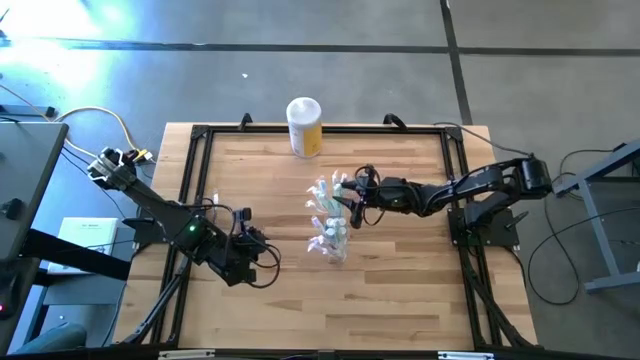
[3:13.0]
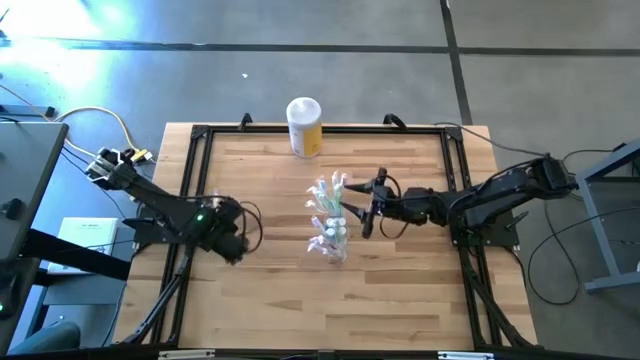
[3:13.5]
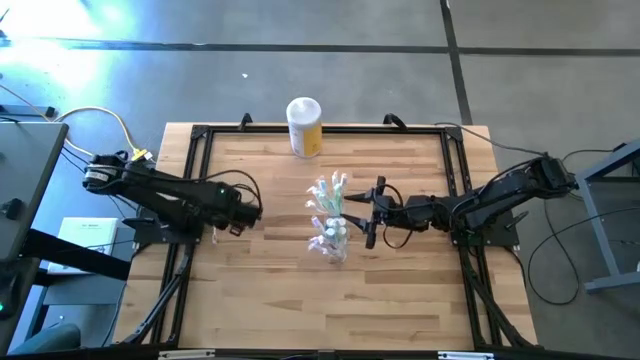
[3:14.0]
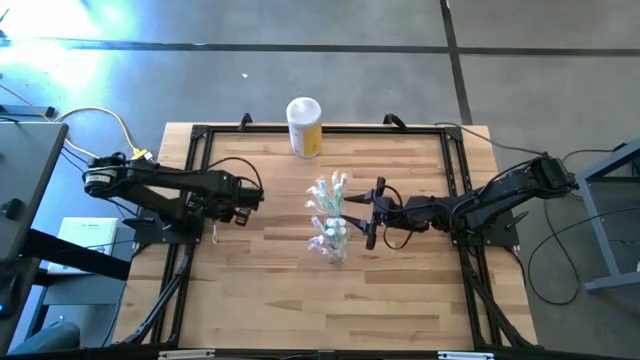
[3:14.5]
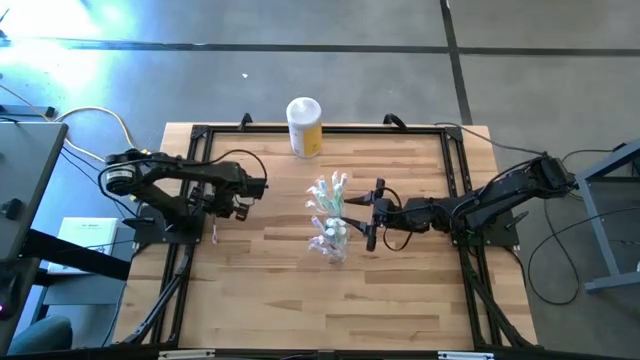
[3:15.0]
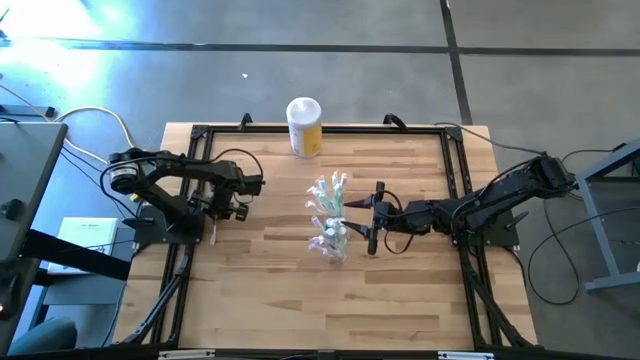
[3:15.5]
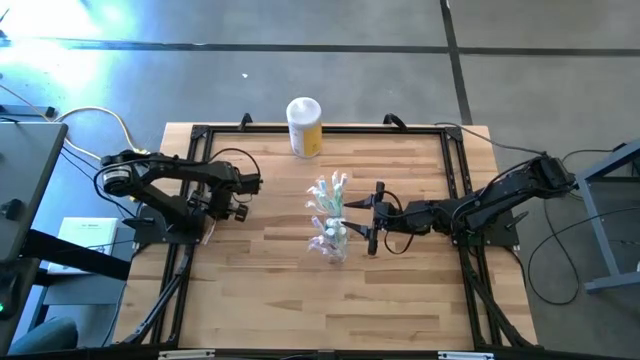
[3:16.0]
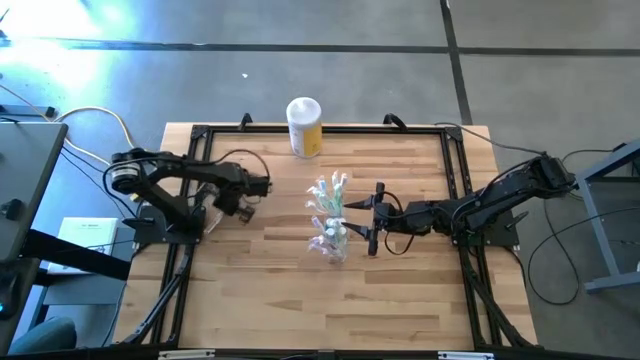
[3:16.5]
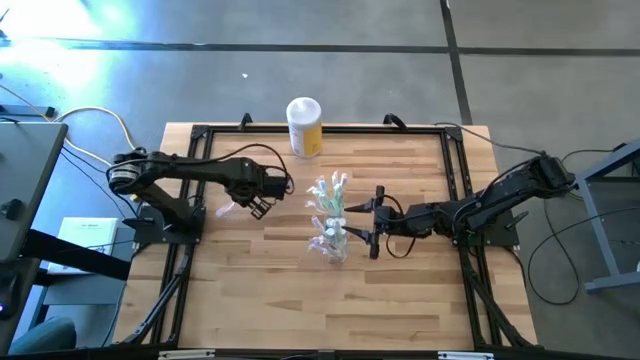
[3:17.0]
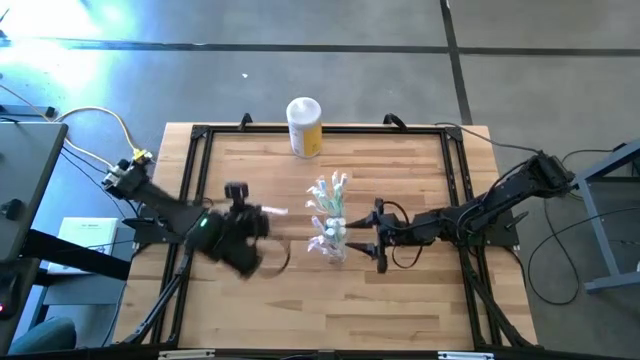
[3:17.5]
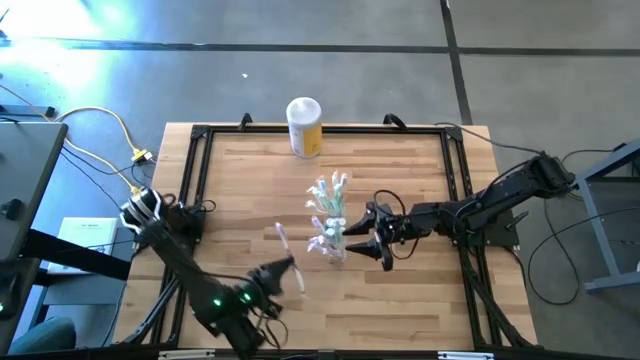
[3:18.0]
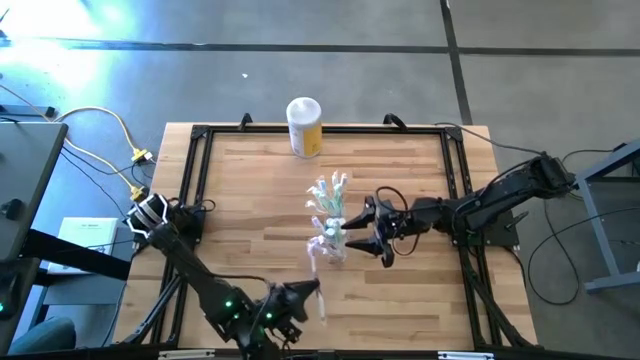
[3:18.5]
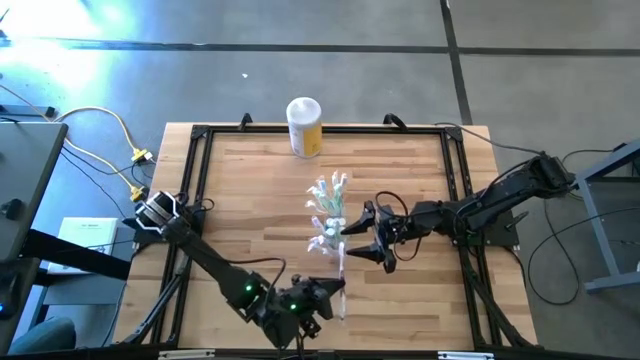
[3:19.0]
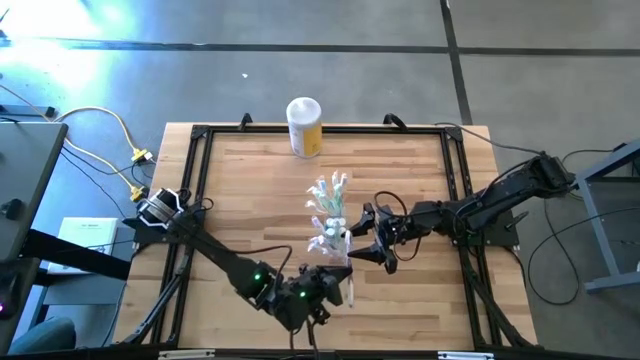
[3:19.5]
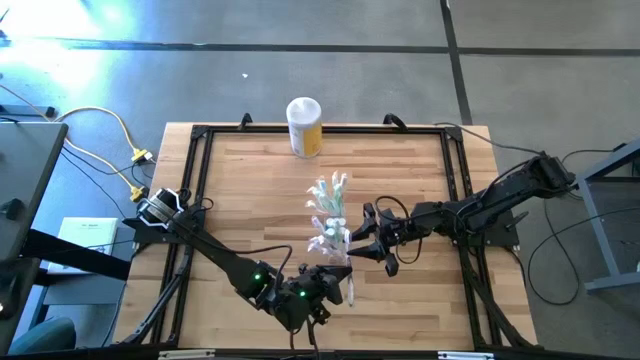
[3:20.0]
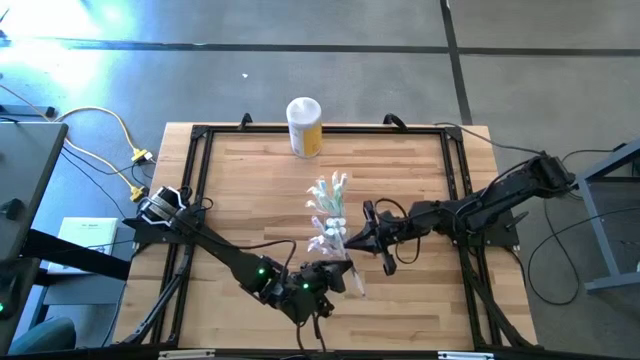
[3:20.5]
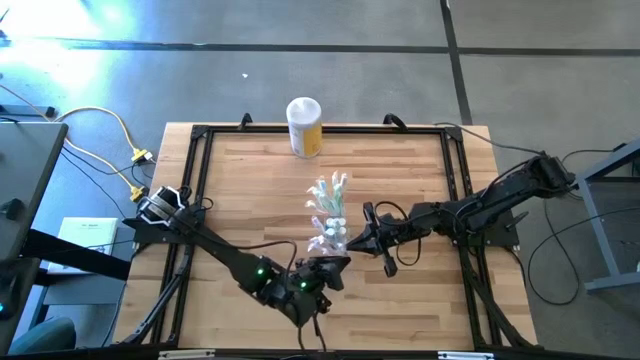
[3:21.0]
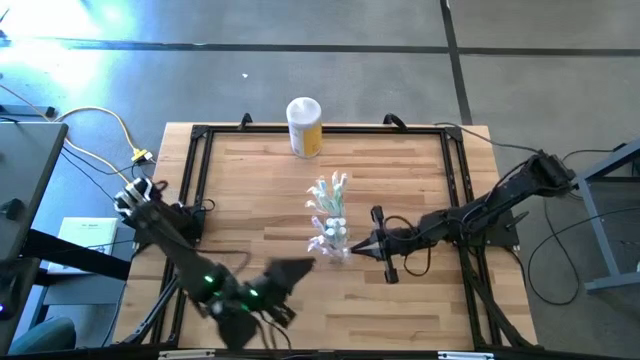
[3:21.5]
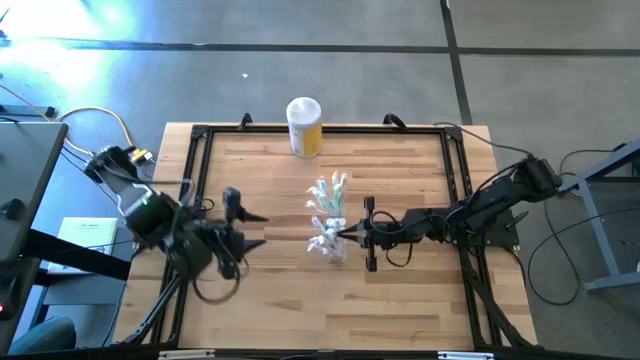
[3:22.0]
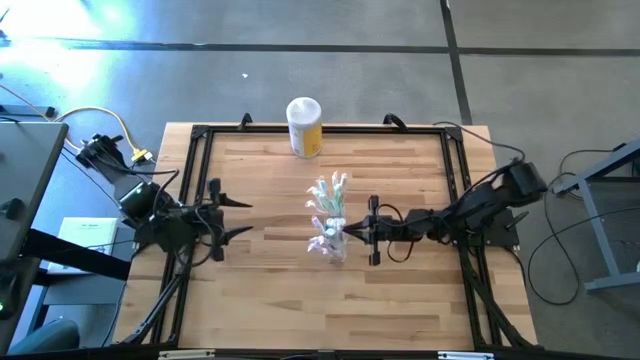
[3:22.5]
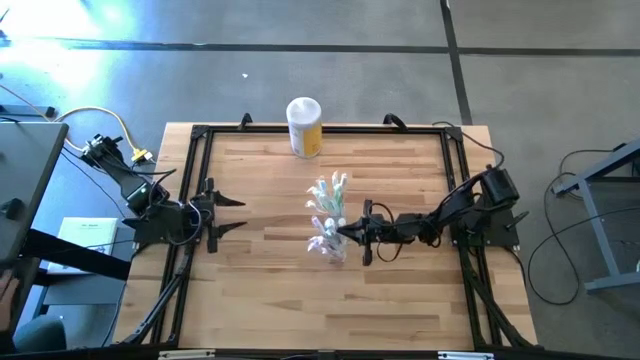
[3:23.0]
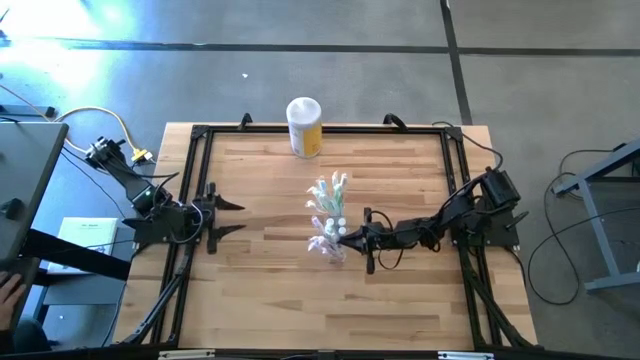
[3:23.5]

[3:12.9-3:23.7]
Task: Pick & Place toothbrushing station
Put the purple toothbrush into the transparent organizer

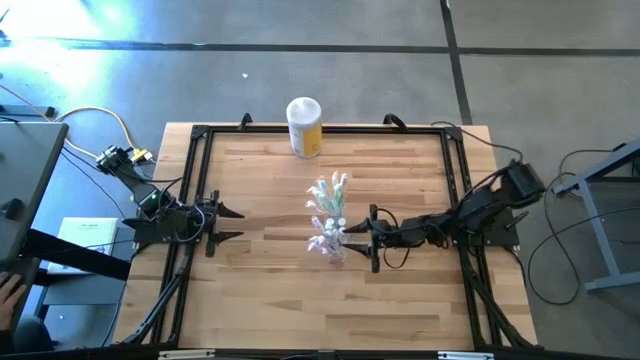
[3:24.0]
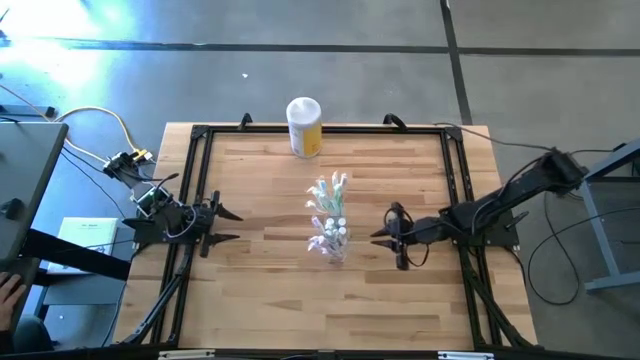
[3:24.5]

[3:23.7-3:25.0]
Return to Home Position

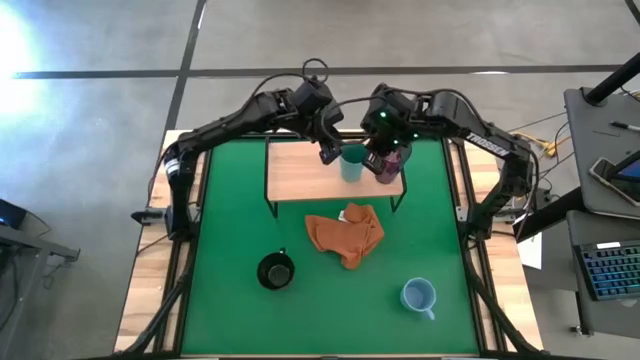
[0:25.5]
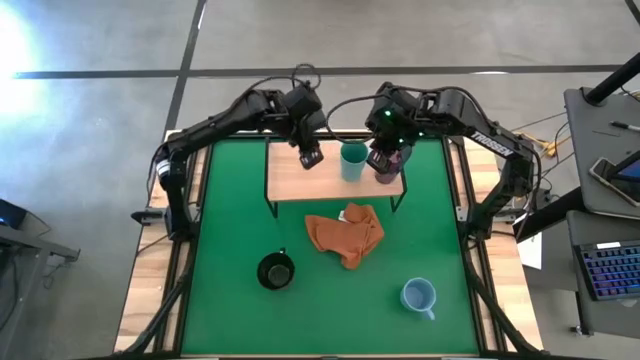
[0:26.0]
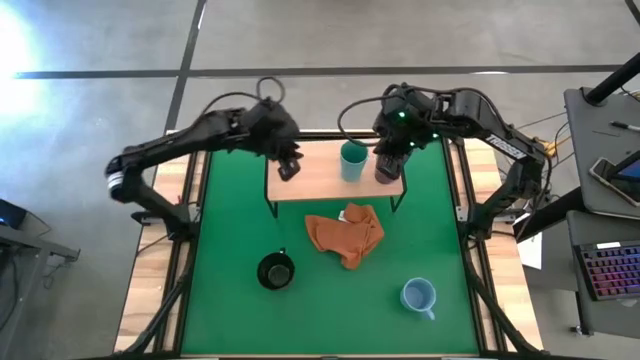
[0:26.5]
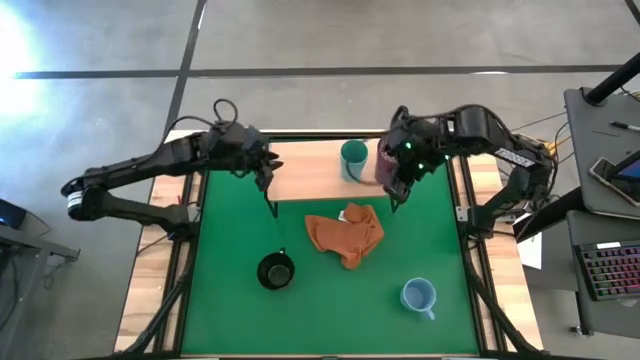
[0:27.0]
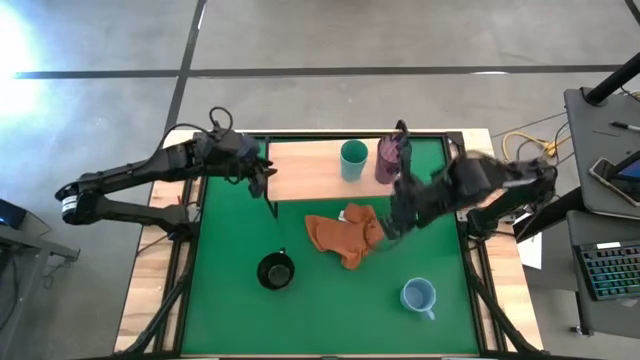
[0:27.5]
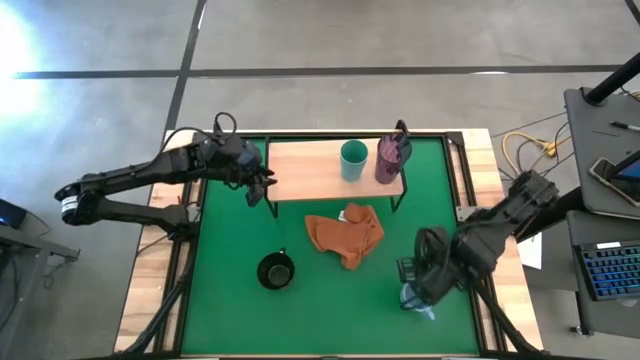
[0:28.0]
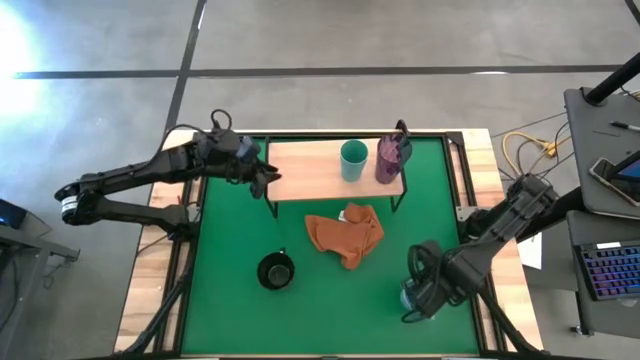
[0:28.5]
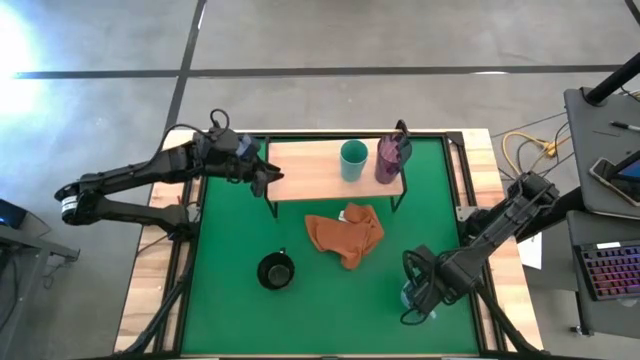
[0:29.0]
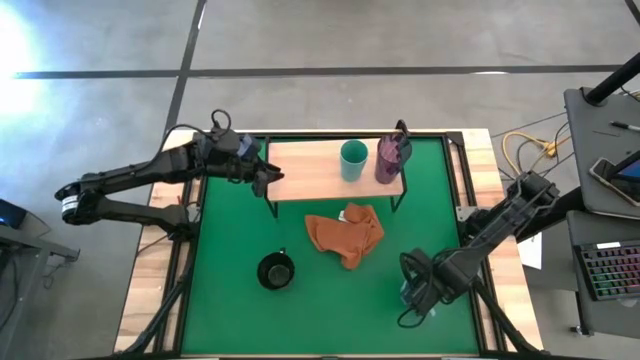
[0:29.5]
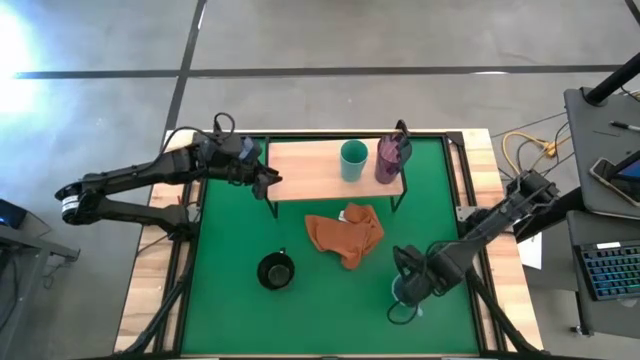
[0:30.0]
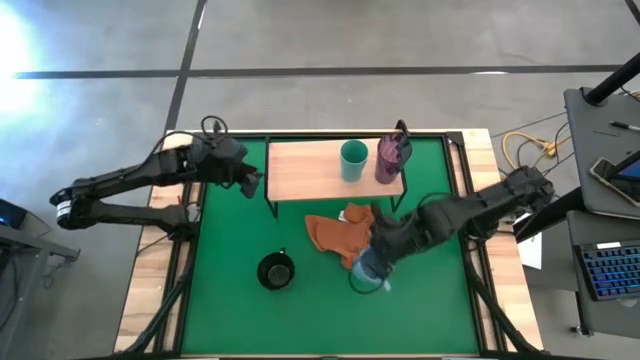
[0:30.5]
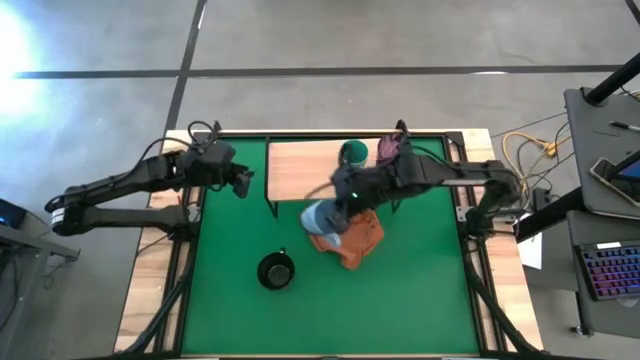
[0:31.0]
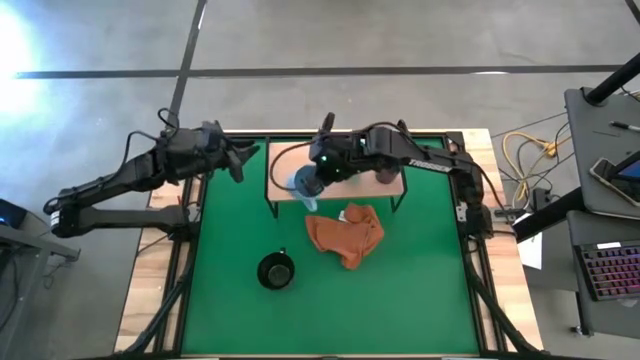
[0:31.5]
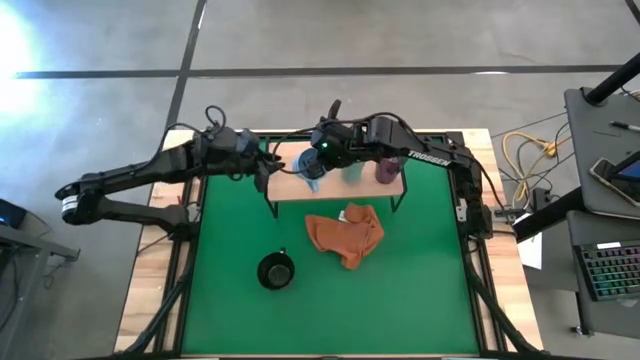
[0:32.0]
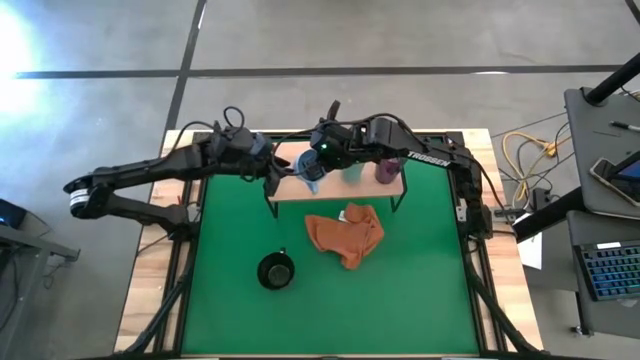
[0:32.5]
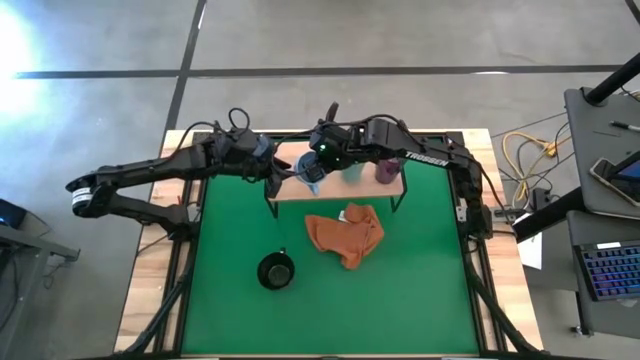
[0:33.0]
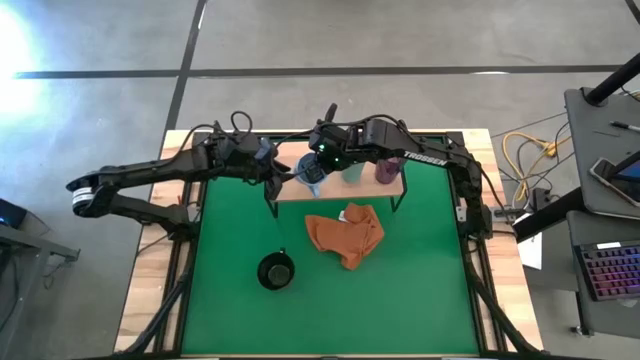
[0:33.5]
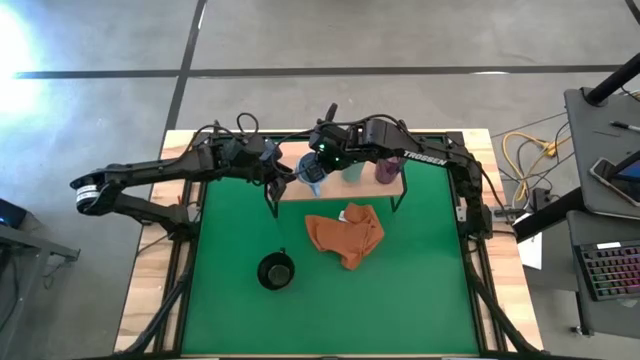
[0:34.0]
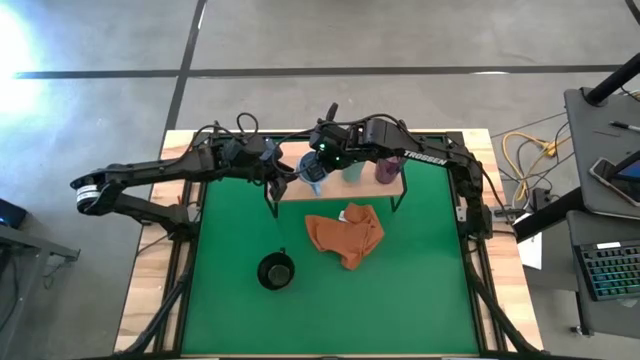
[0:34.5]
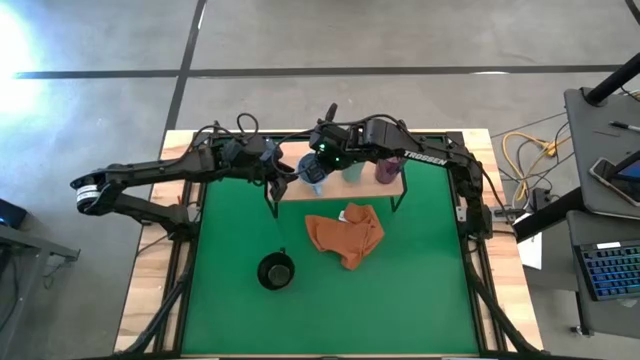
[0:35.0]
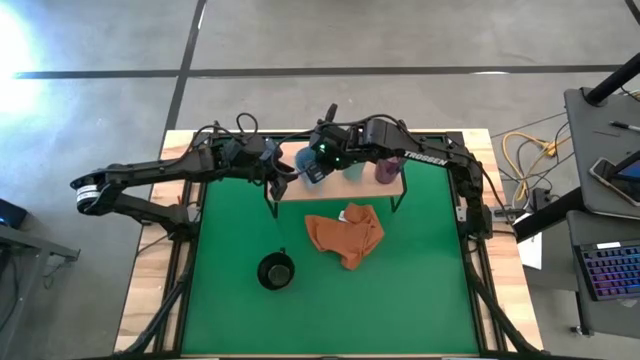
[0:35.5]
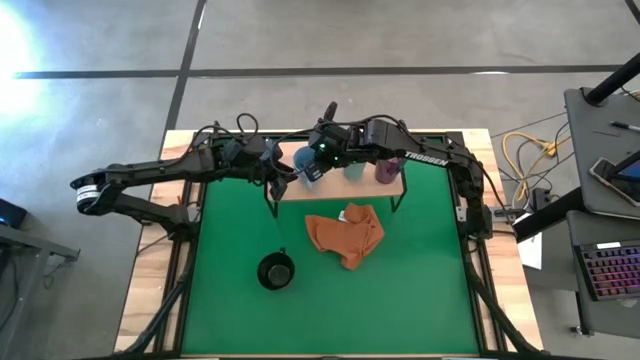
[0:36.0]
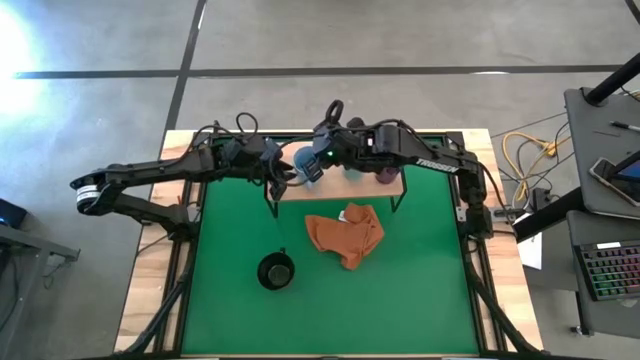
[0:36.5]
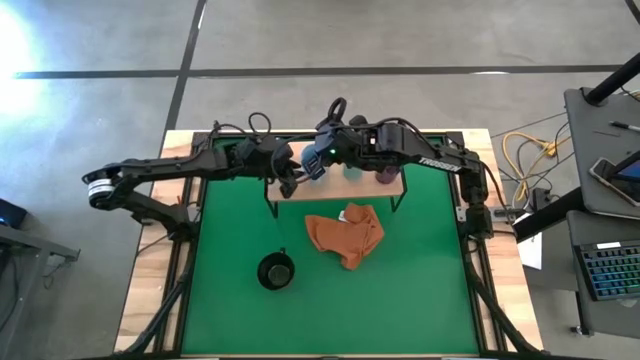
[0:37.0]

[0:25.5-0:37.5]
Task: Stack small to large cups/mugs on shelf
Put the blue mug on the shelf
